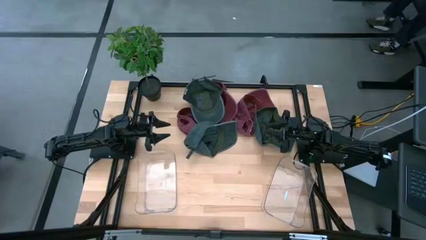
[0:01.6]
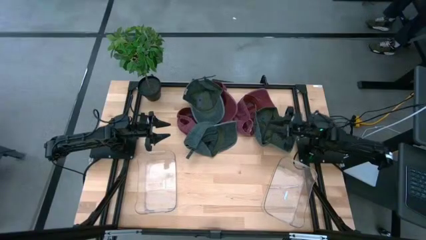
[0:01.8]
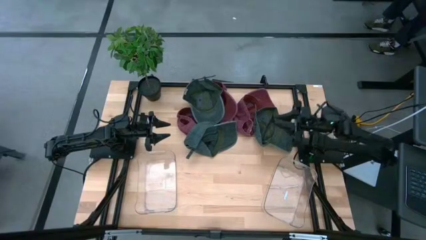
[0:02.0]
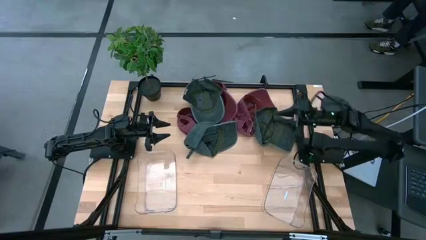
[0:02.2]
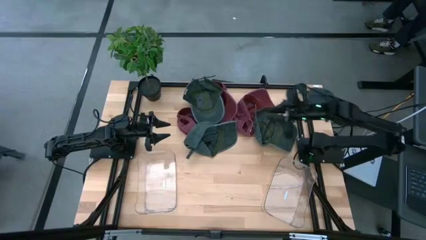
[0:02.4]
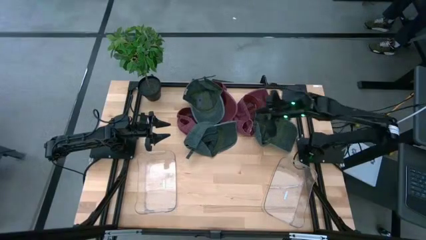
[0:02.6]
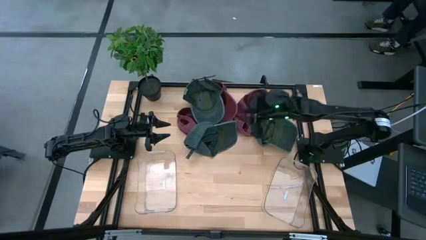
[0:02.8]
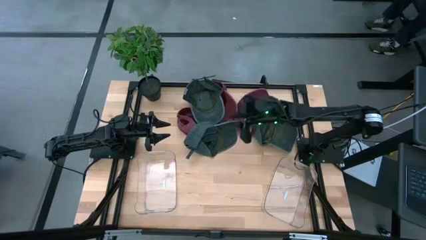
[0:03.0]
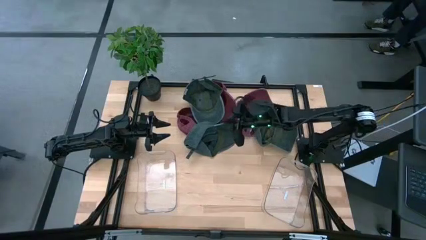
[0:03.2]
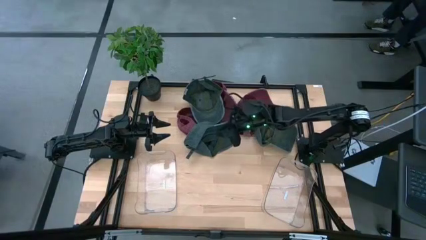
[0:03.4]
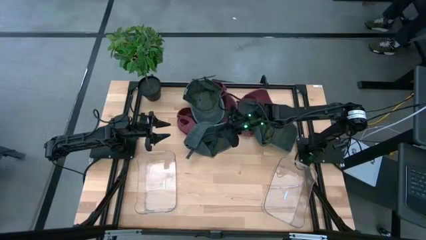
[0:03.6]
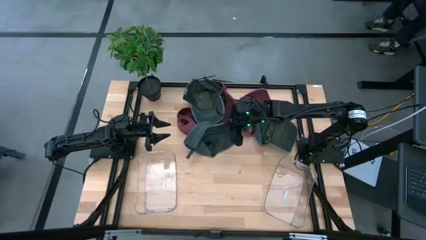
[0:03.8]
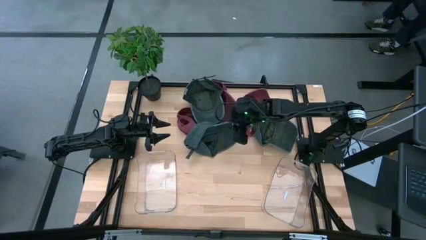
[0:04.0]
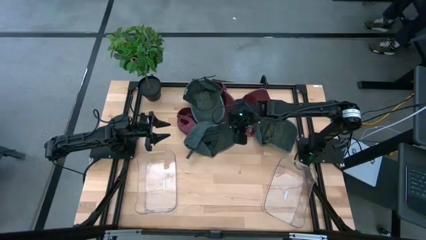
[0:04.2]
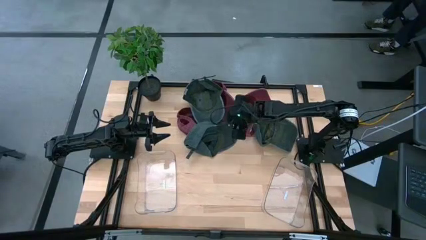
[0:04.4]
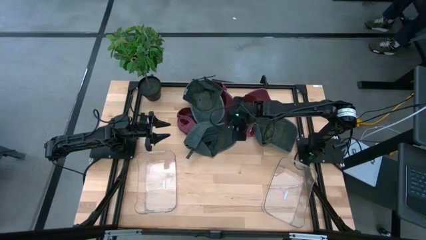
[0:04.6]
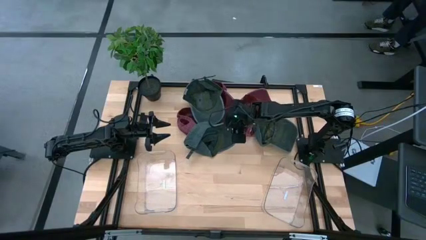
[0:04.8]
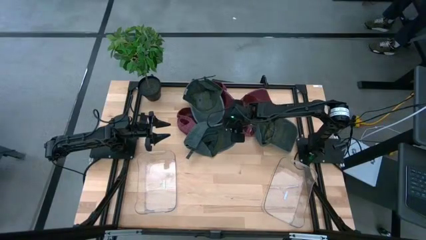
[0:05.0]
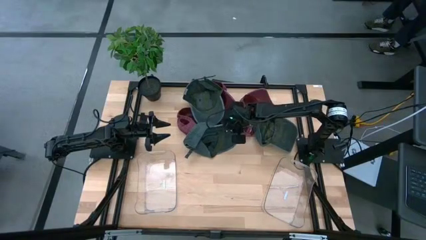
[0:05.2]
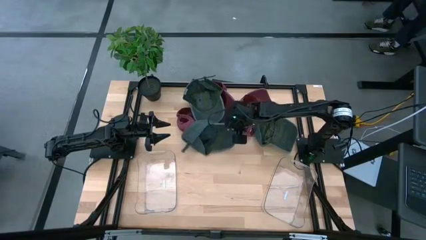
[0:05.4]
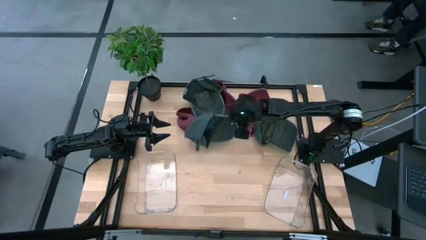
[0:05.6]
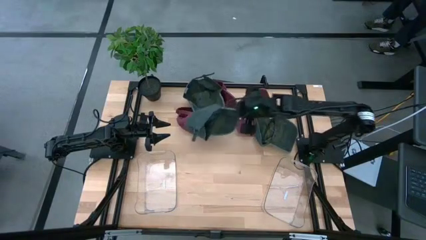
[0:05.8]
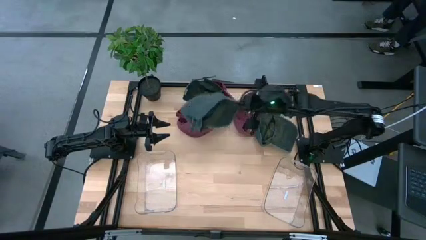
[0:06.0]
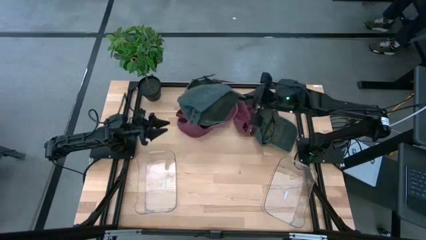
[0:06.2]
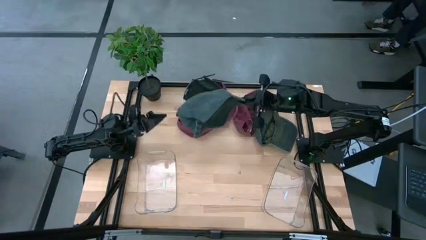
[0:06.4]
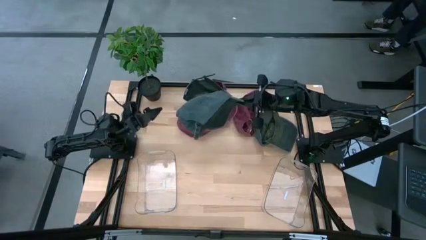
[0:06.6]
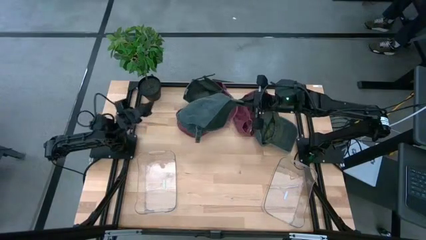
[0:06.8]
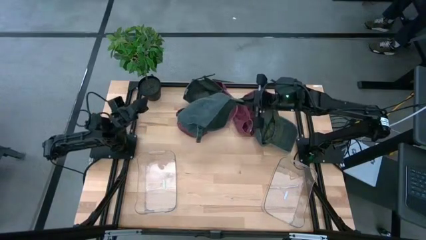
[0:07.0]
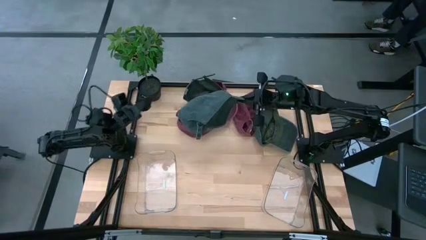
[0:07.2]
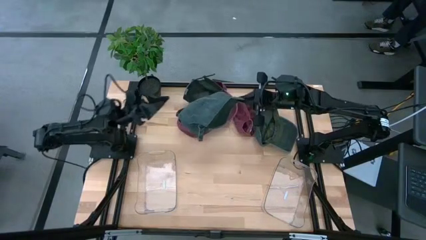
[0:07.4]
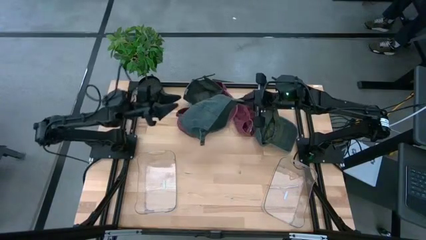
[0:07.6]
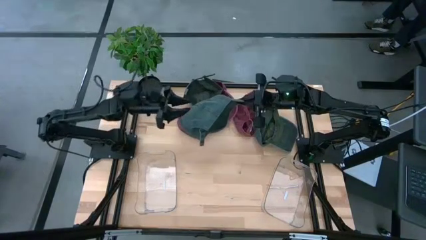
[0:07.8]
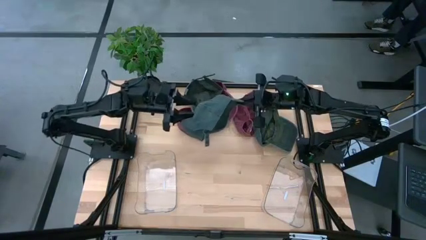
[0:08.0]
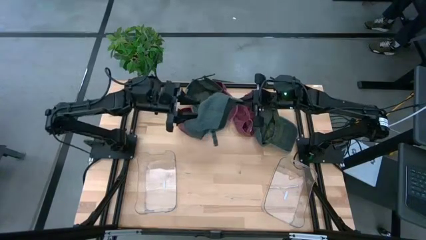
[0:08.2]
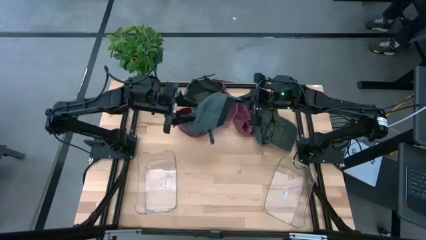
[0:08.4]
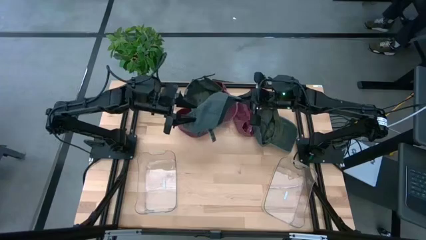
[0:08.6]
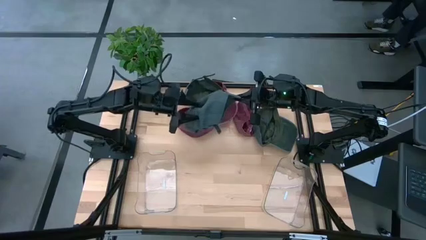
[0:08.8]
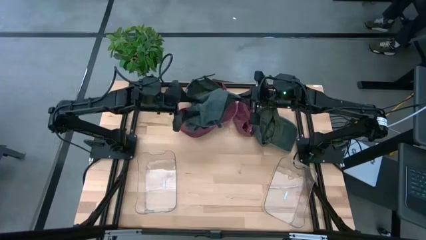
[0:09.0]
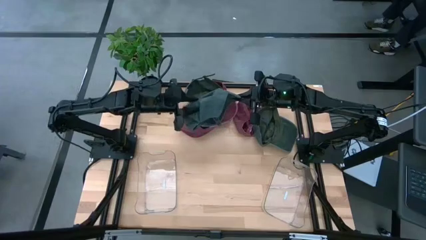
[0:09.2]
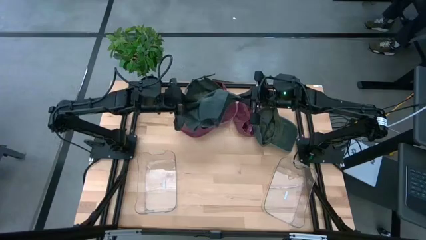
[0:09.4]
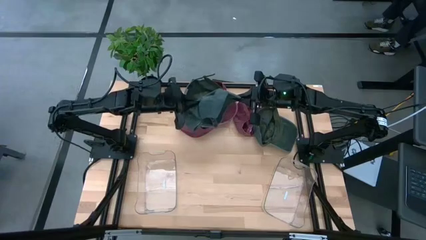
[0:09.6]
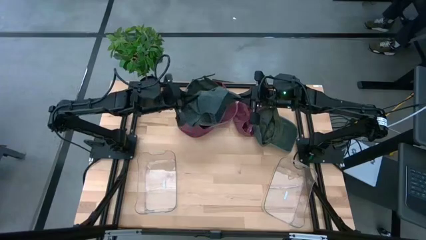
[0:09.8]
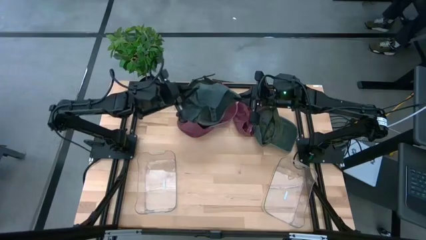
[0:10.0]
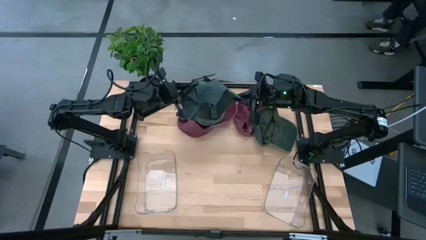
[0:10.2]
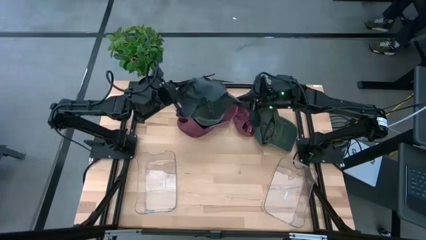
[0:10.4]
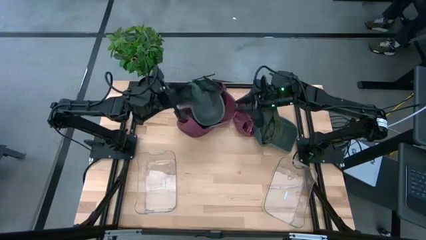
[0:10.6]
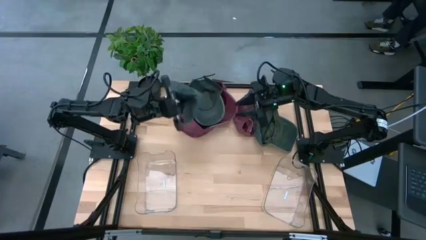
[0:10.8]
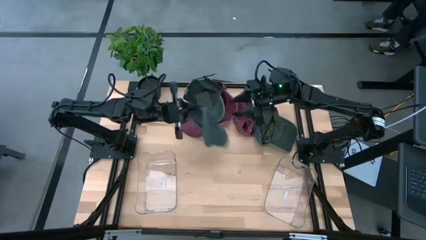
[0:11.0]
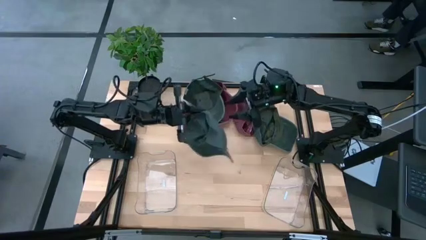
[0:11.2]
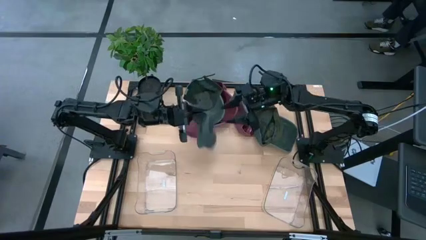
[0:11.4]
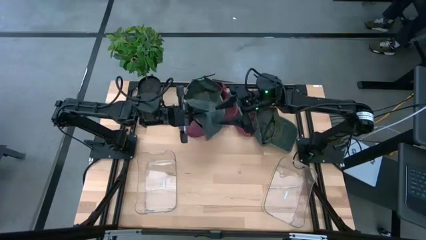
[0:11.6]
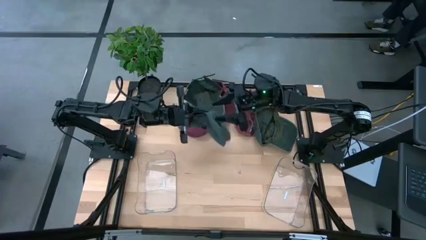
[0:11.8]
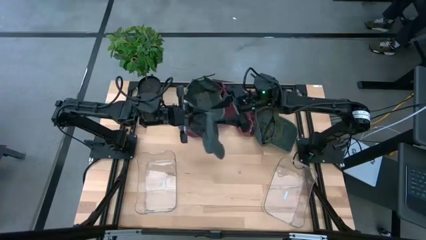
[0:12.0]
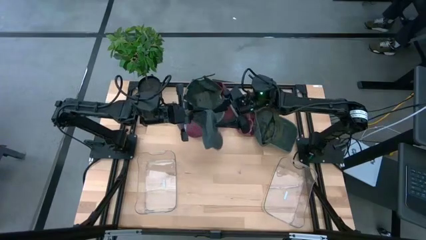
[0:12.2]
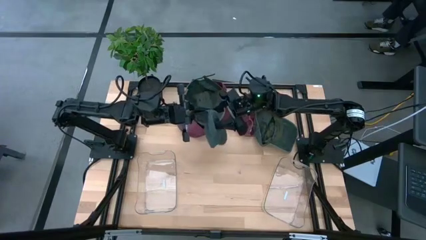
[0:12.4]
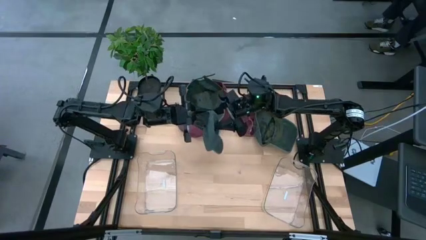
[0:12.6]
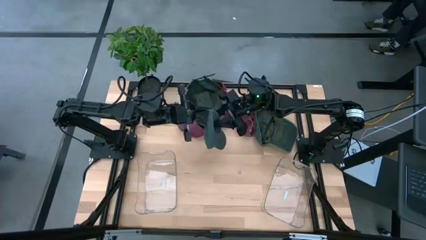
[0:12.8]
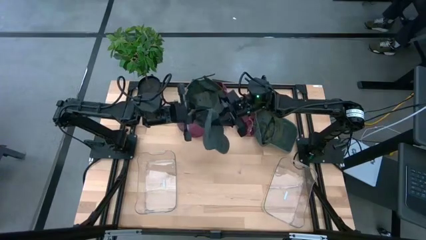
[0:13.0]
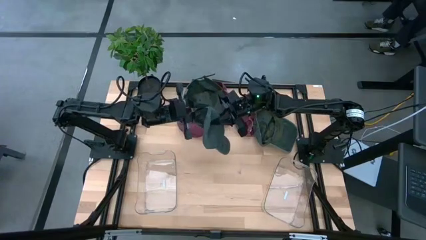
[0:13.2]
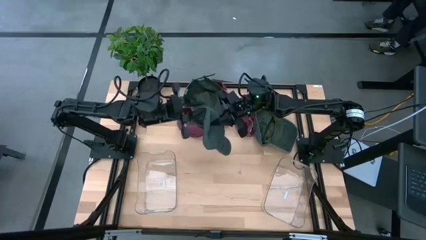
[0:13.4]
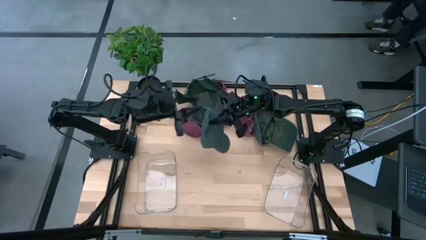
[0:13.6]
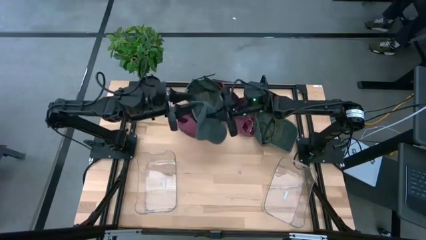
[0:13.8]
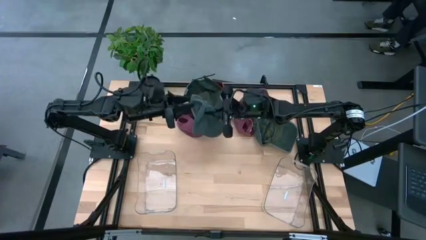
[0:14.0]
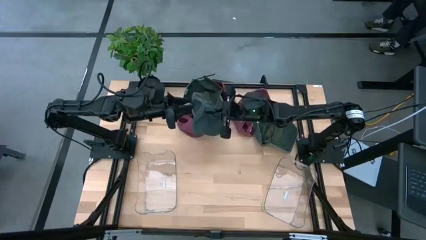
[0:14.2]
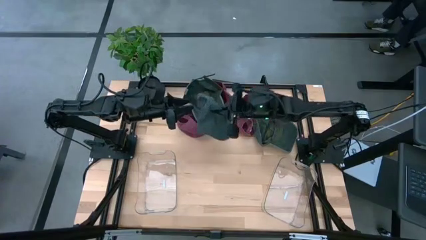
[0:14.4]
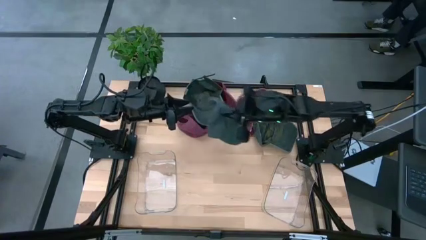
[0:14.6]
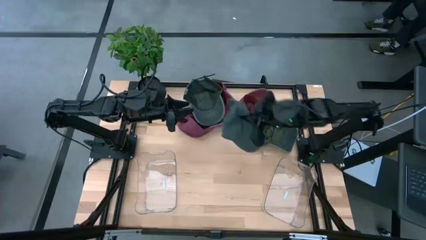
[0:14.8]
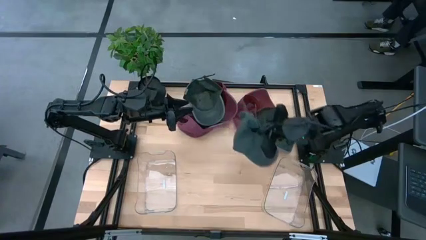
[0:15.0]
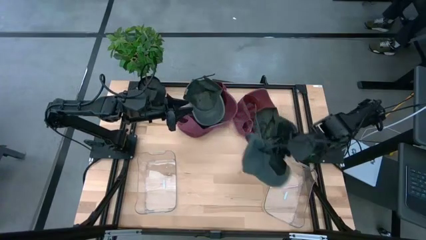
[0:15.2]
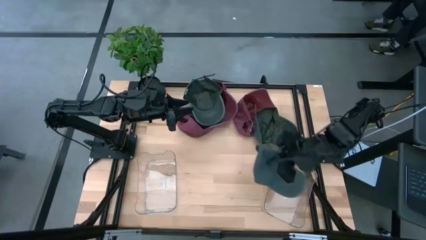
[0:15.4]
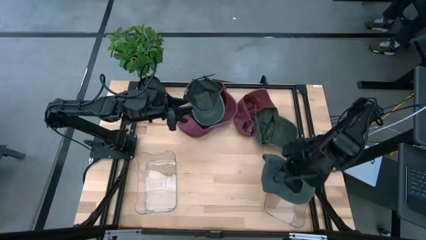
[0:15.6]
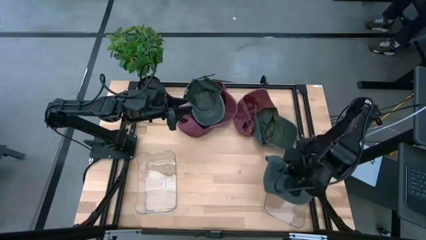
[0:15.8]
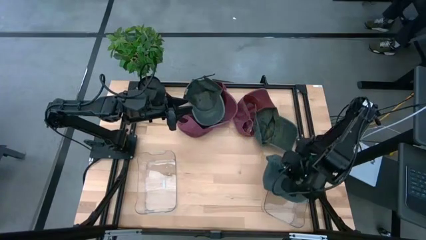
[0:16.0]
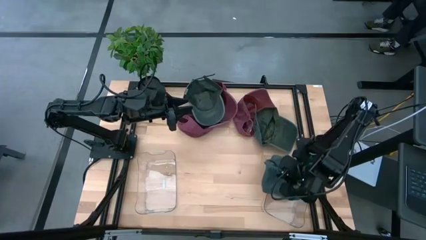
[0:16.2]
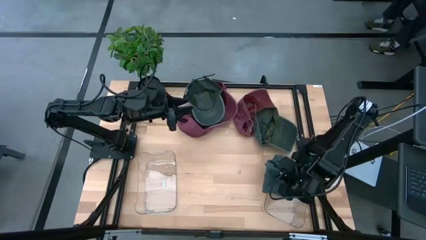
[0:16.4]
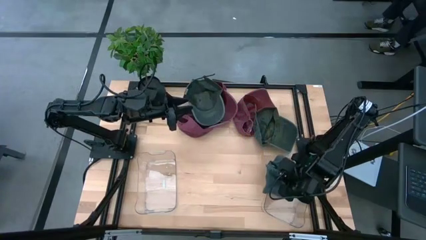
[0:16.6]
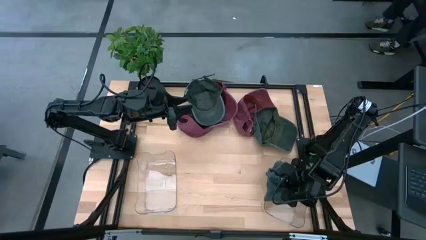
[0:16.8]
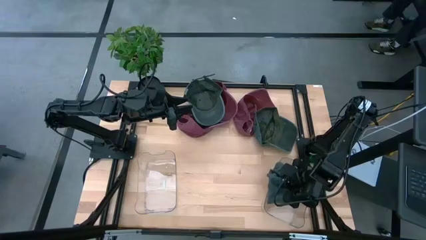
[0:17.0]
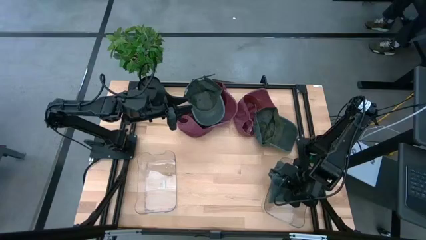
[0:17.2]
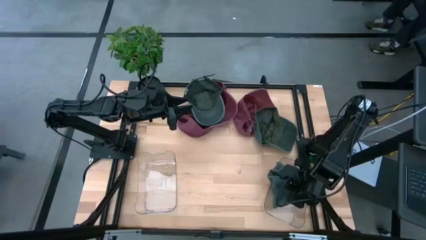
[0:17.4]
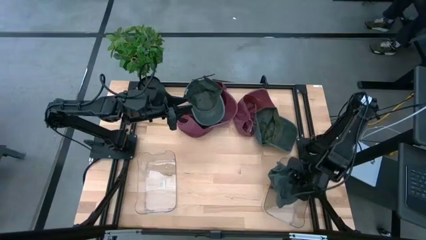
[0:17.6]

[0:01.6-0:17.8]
Task: Pick & Place hat
Put the bottom left gray cap into the right transparent bin
